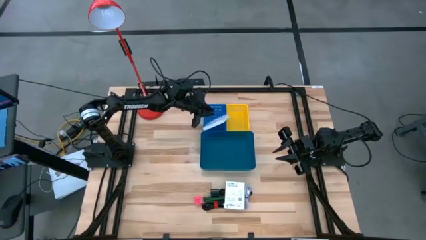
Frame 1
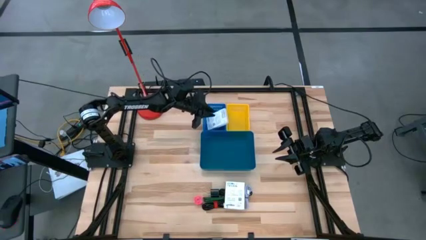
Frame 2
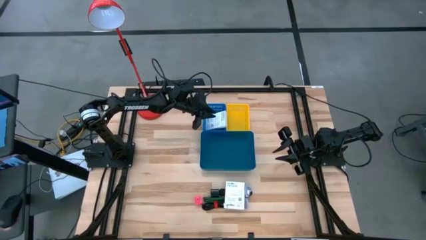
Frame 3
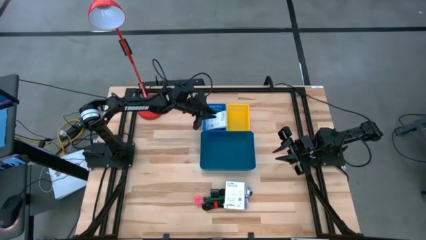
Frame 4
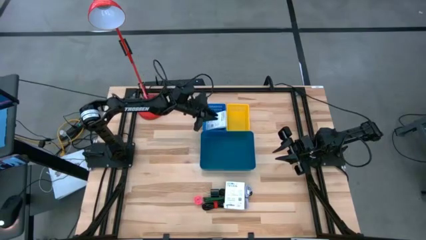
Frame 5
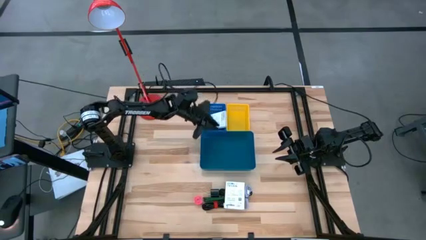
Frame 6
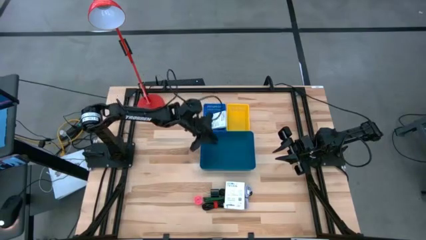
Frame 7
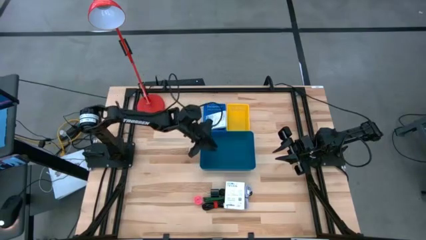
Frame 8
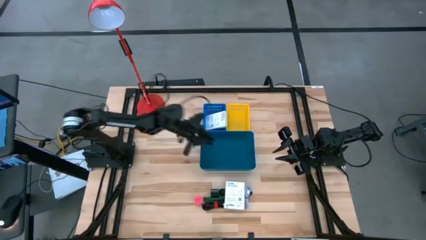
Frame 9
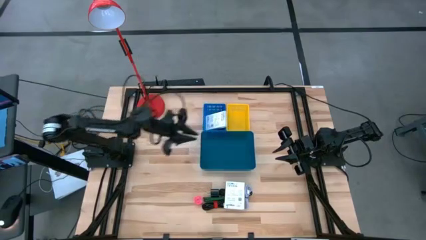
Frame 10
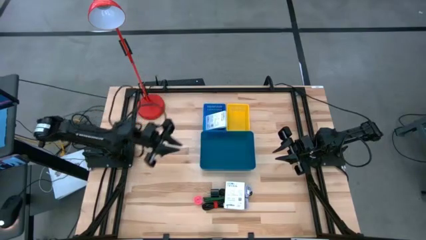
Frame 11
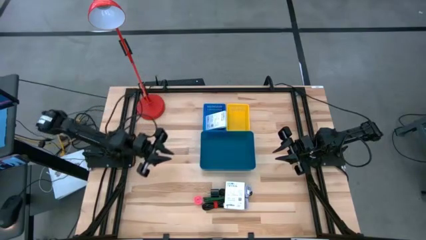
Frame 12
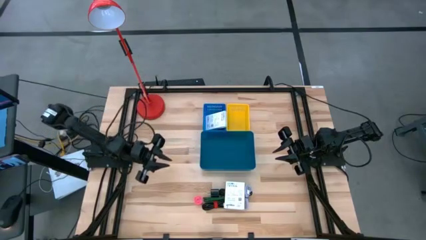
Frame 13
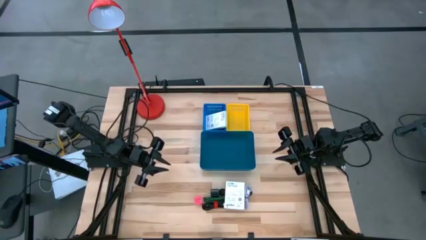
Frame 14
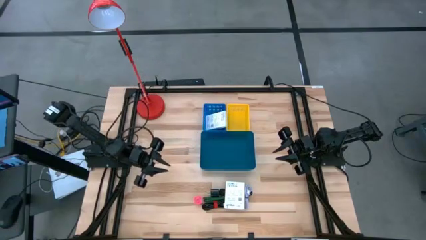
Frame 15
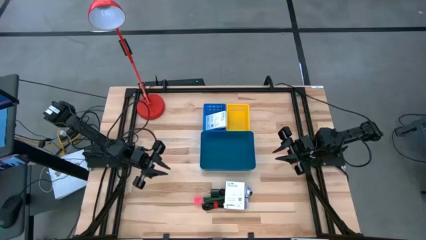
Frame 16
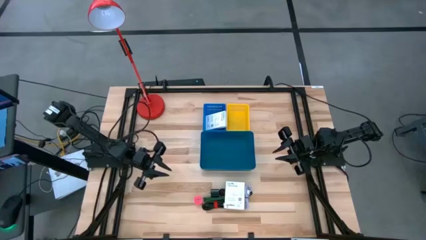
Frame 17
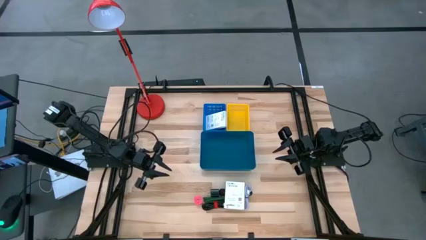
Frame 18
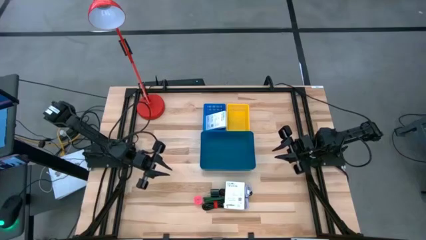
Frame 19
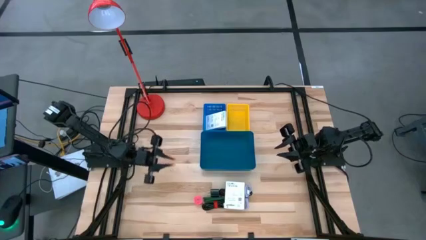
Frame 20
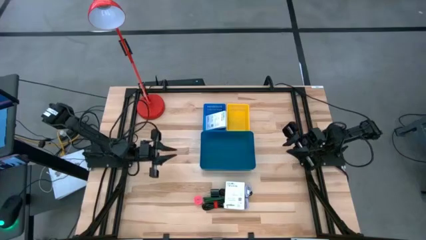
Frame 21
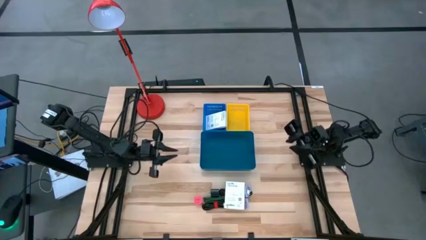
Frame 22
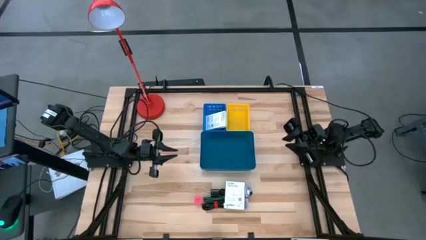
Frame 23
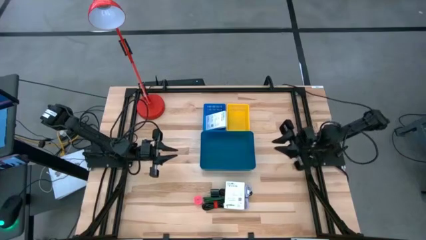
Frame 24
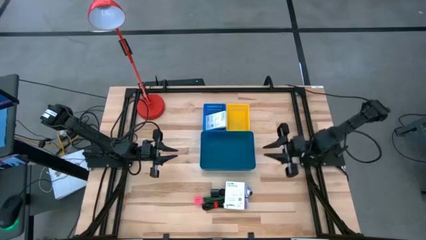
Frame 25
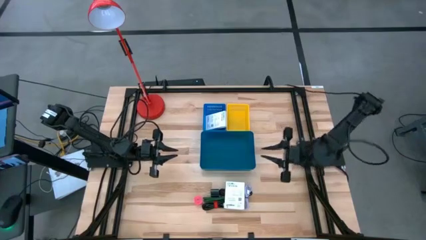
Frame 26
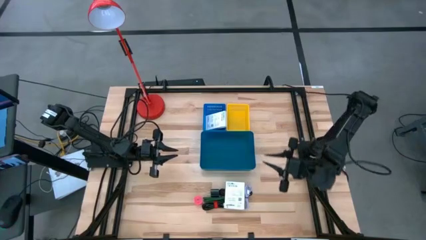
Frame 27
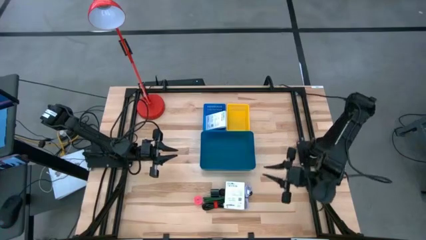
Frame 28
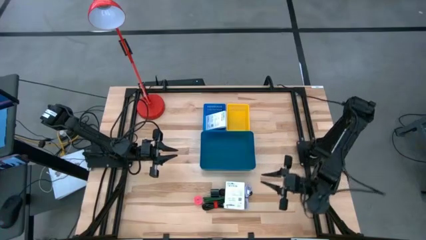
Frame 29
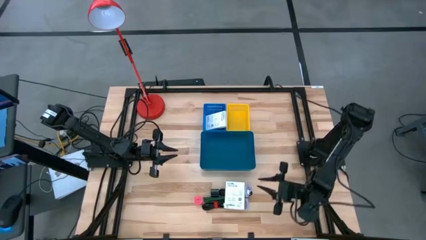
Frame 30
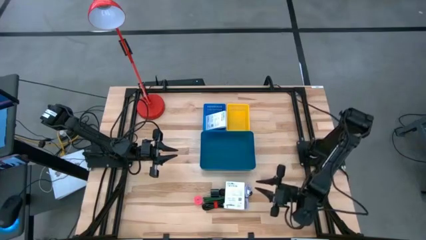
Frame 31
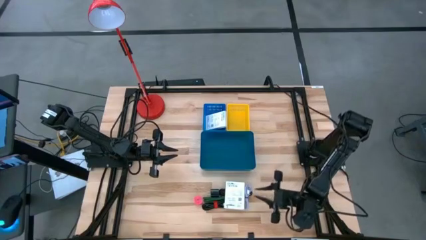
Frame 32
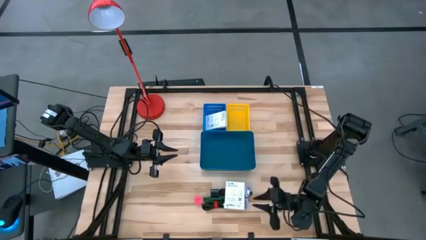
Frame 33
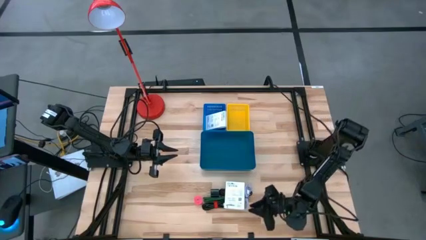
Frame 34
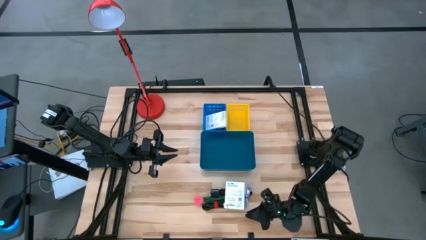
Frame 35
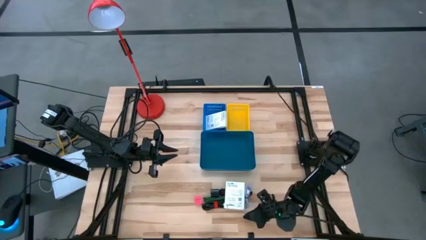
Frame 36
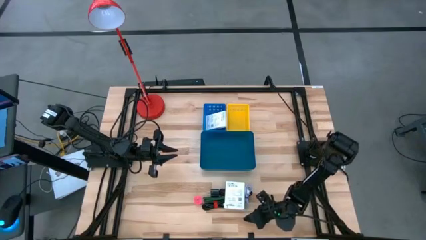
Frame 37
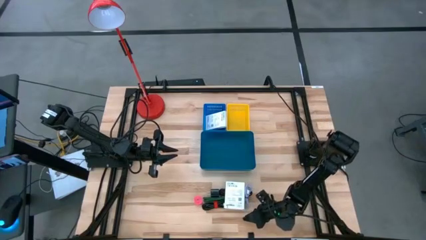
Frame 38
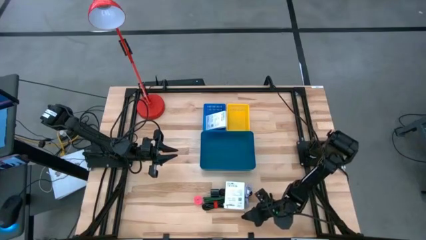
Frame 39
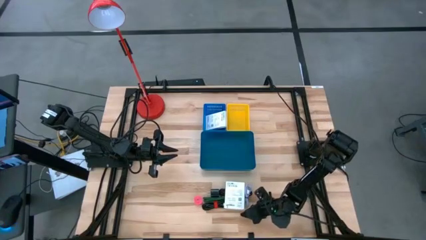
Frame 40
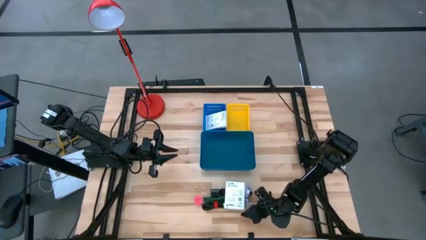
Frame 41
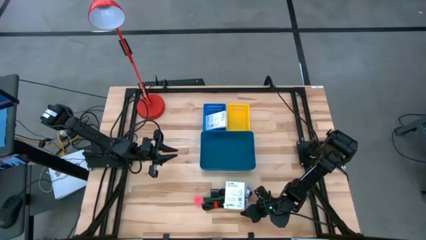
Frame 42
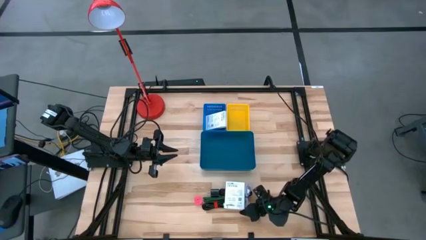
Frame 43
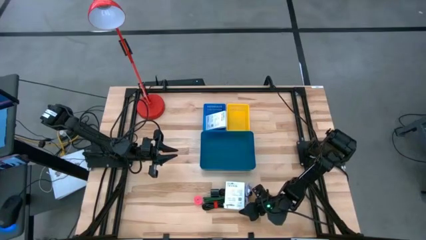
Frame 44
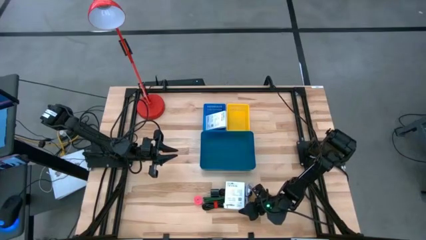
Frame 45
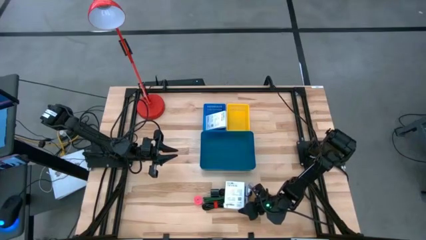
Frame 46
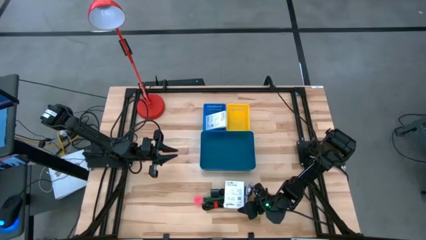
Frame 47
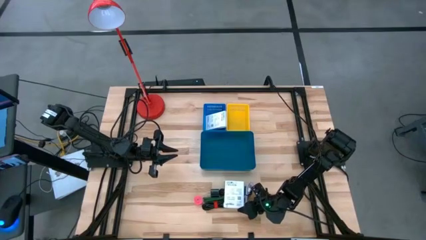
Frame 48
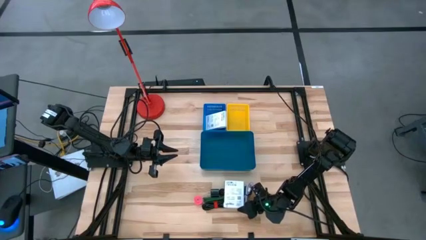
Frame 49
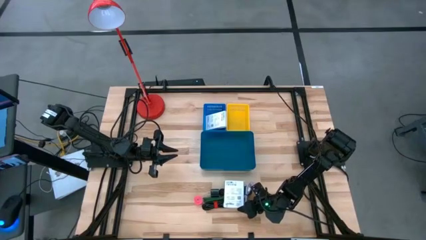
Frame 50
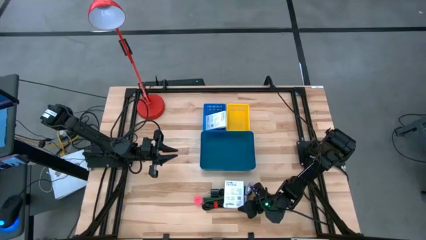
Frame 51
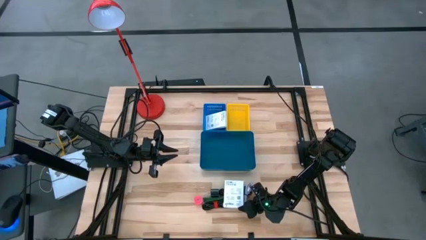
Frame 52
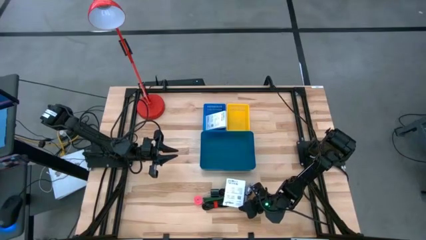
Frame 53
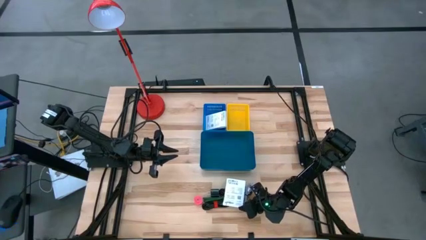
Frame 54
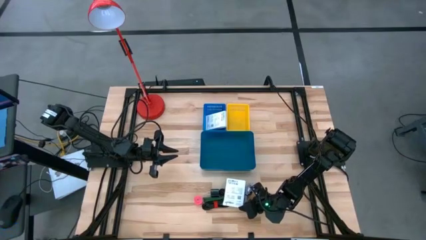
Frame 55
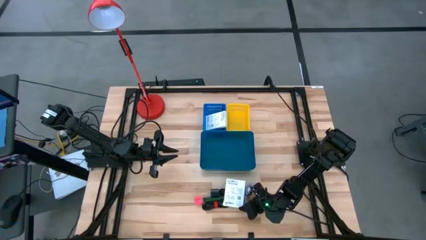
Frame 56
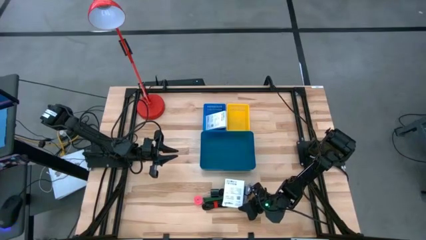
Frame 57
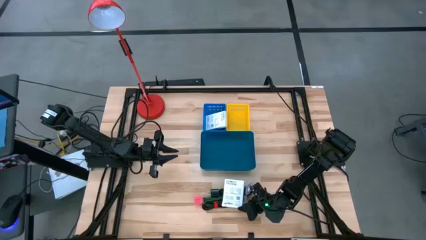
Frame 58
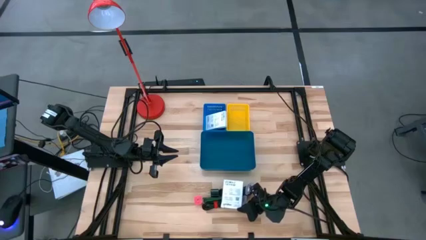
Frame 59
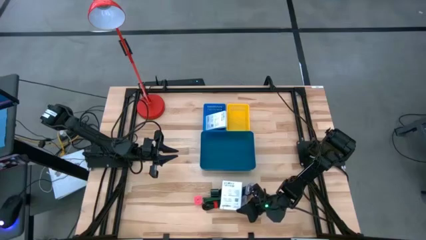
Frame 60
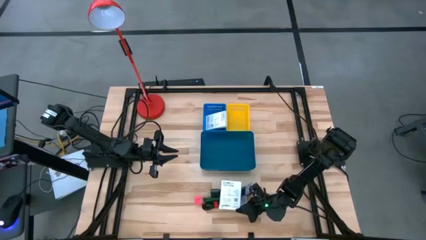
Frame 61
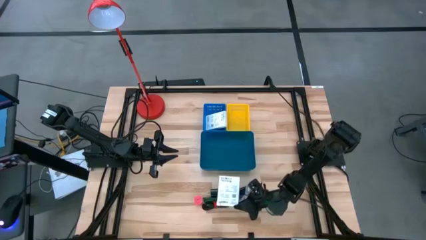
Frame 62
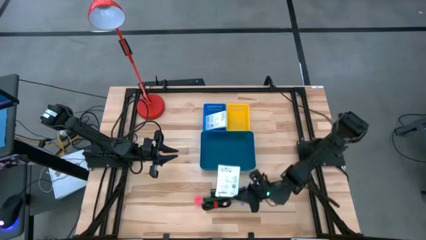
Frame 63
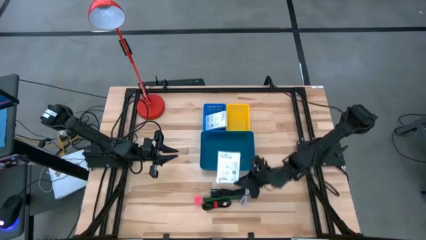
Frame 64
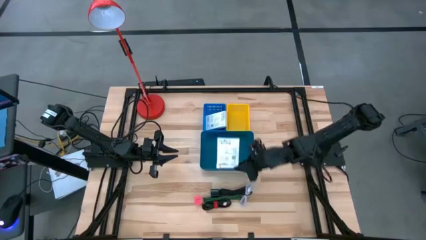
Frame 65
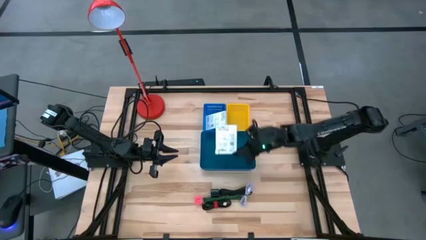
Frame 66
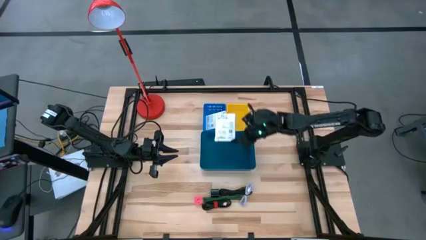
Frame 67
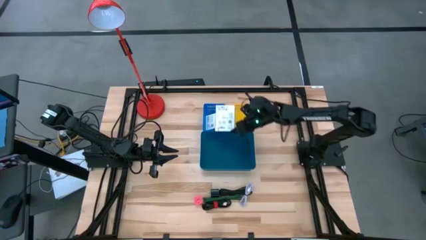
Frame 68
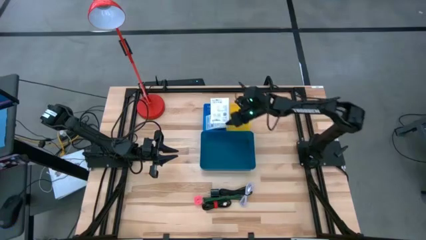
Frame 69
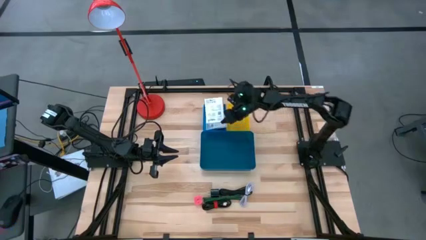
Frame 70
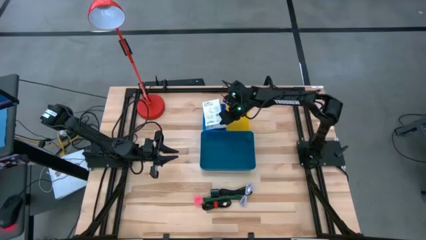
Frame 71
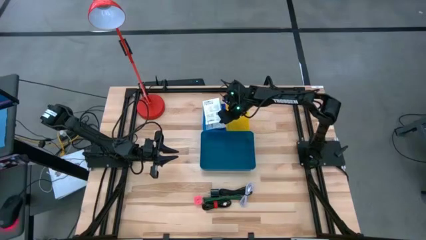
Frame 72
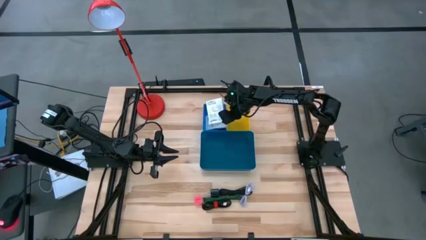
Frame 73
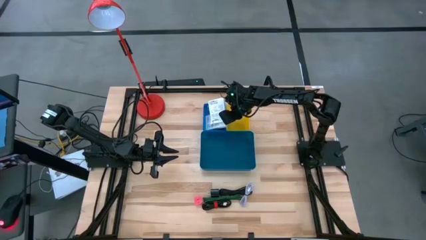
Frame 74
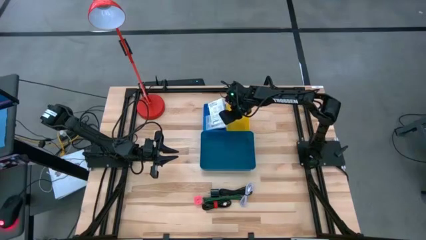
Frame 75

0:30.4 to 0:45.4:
Task: Pick and place items into bin
Put the white card reader box into the top blue basket
